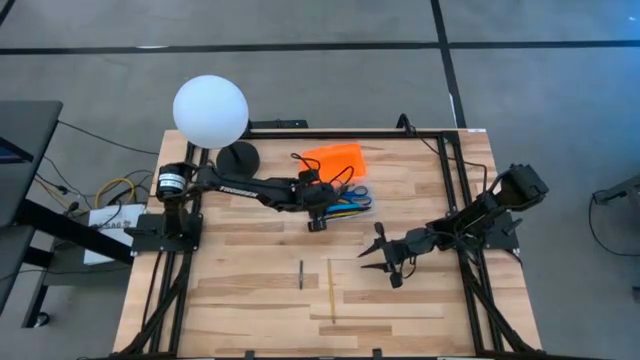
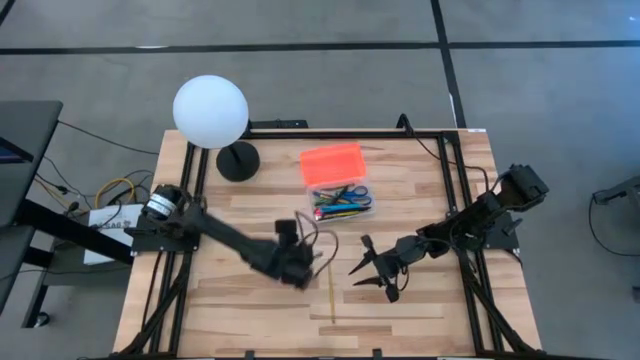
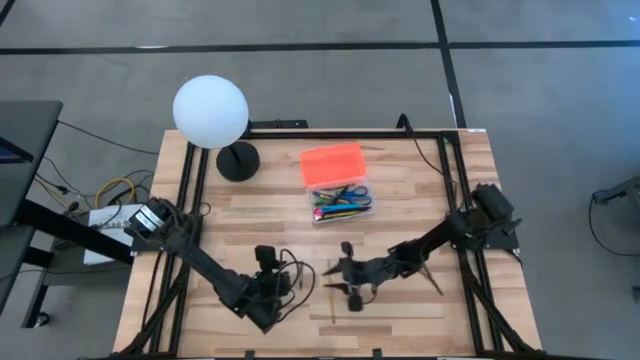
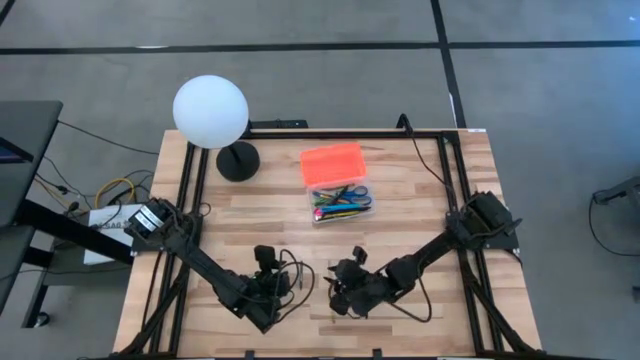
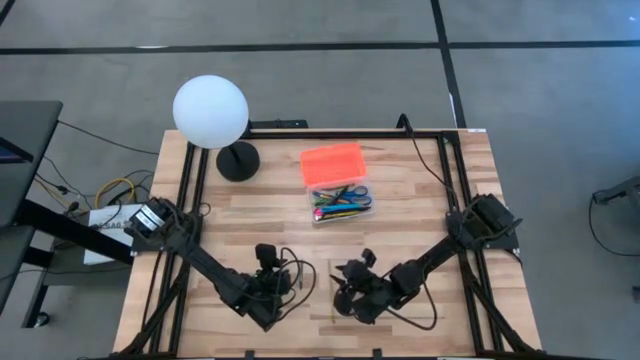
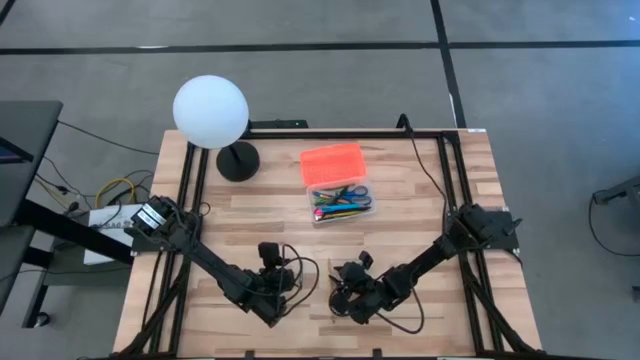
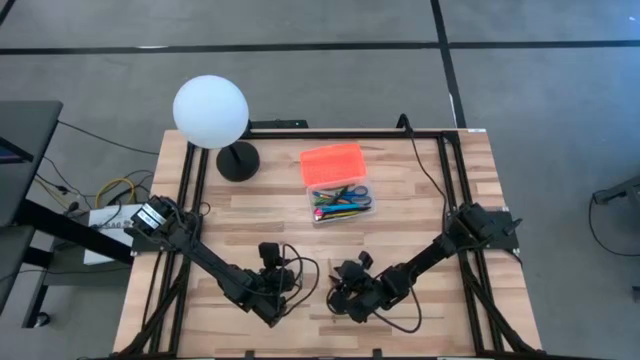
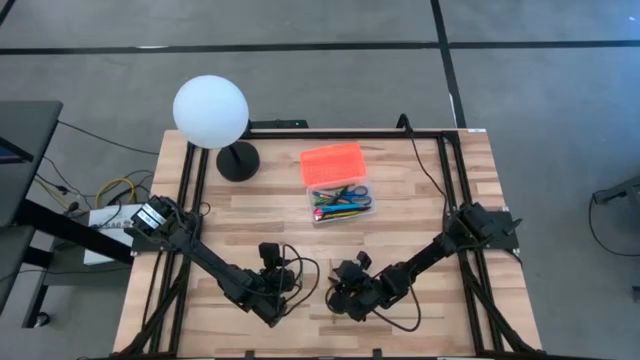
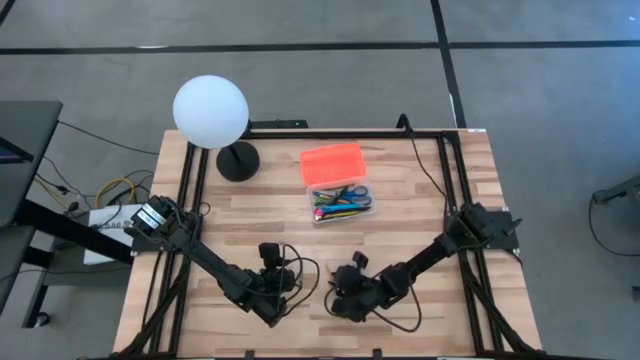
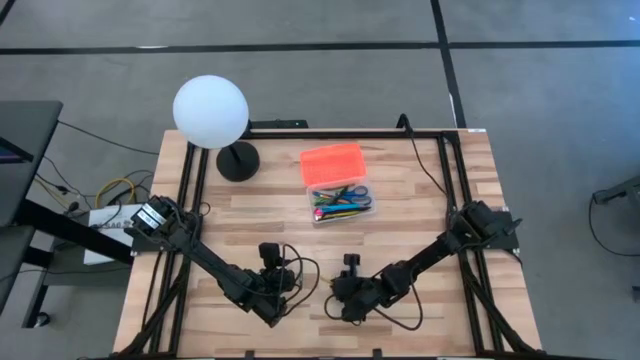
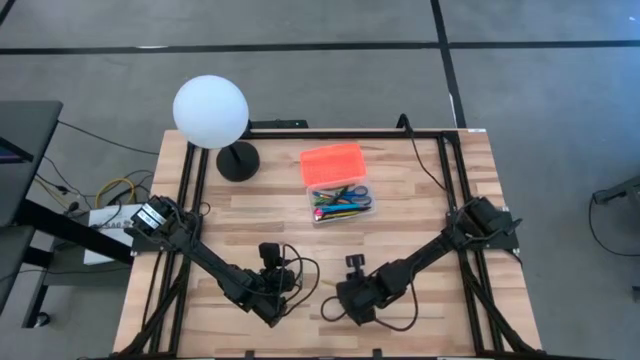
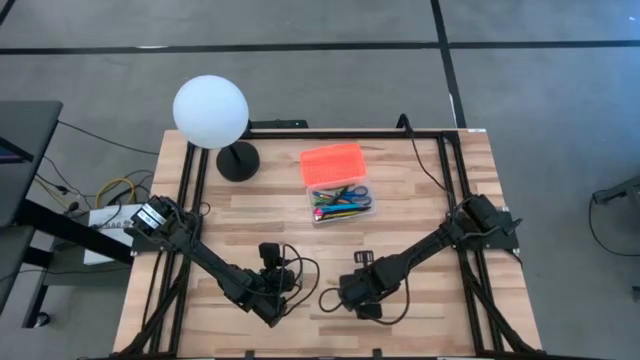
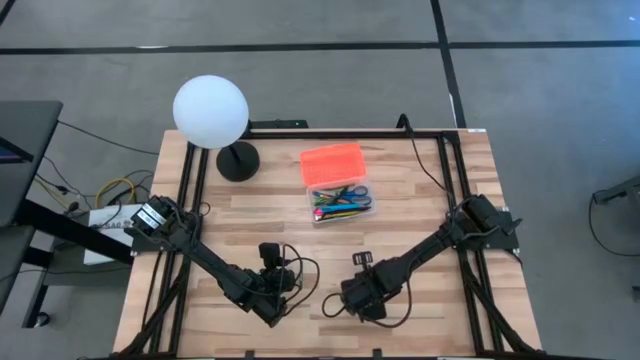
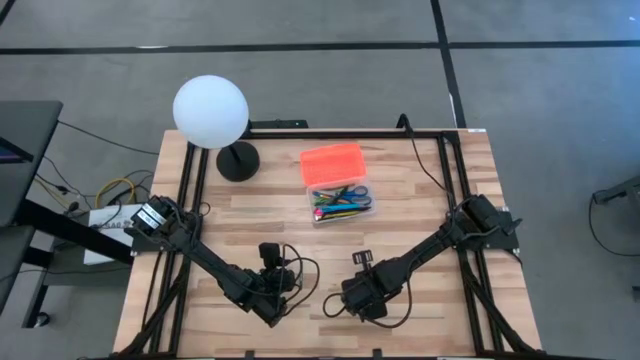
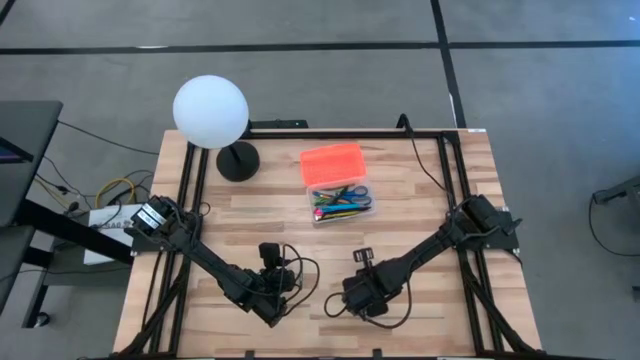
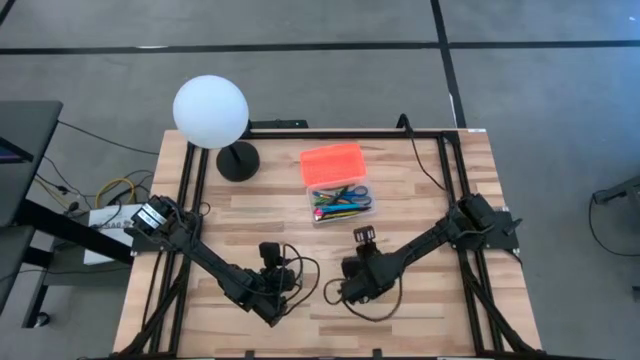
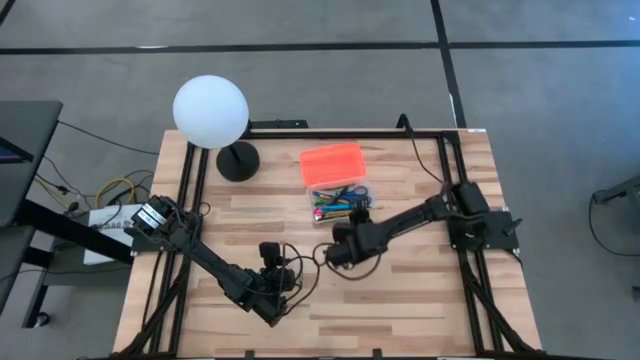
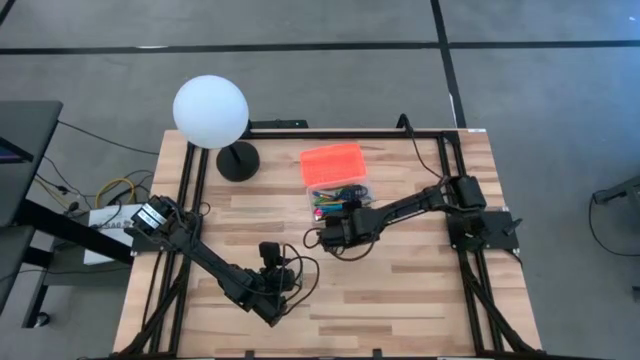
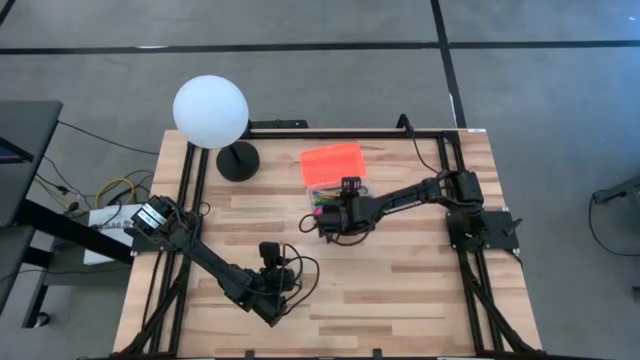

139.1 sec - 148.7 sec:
Task: Pick & place school supplies into a supply box
Put the yellow pencil into the orange supply box

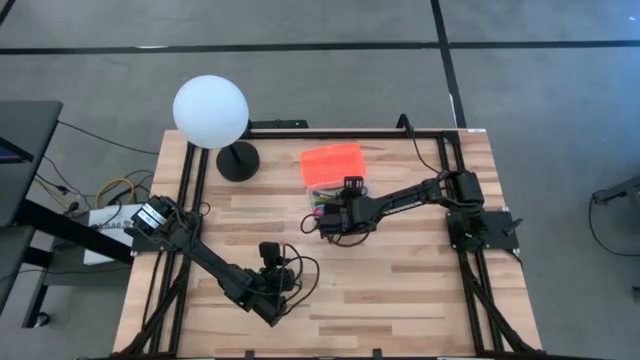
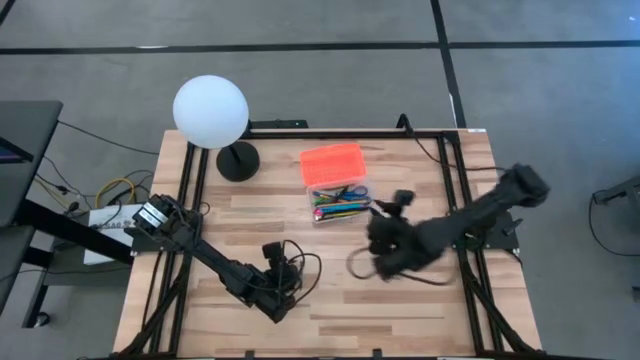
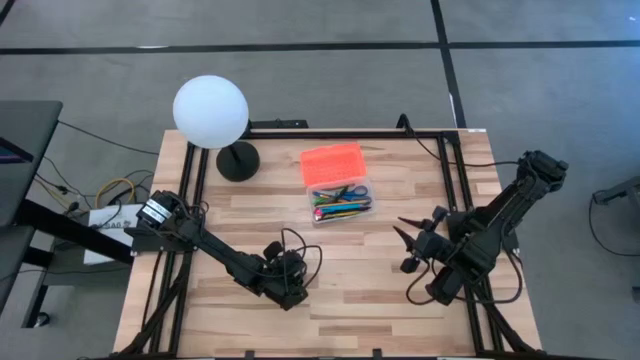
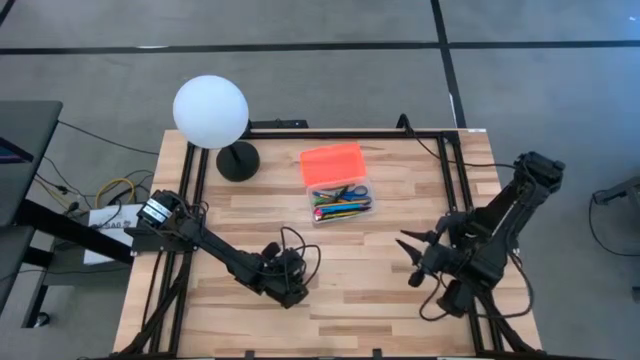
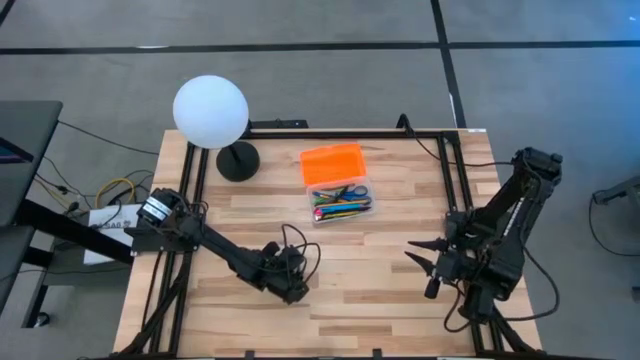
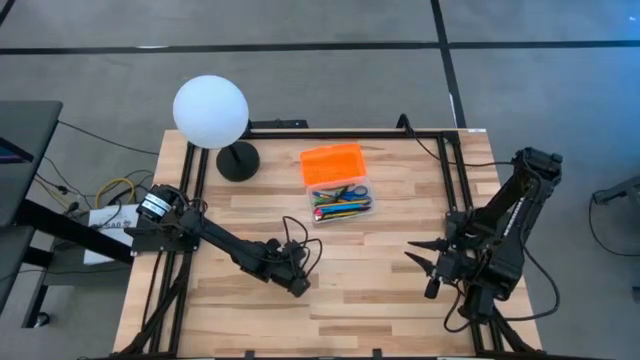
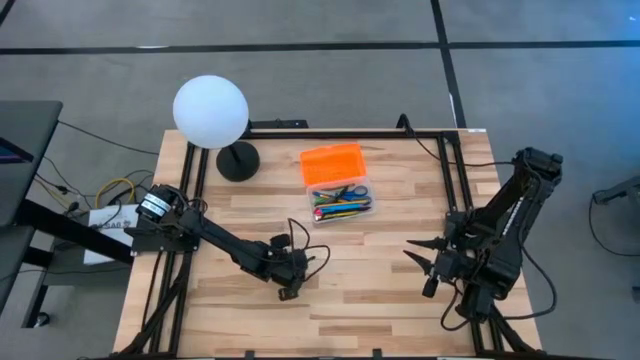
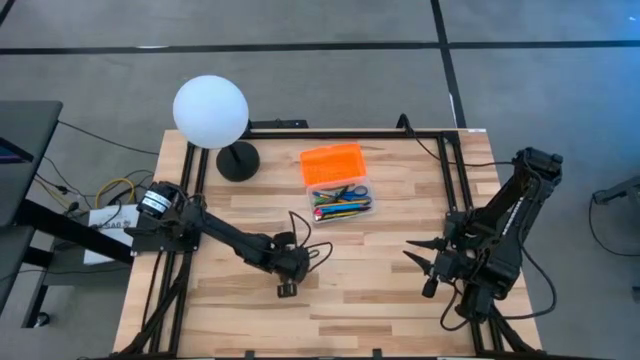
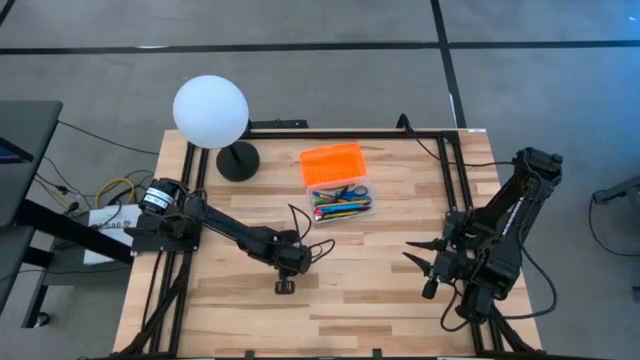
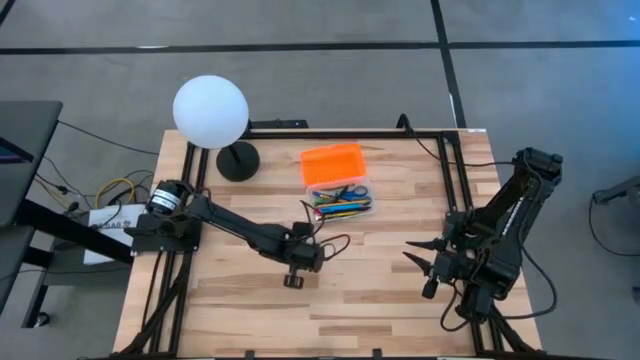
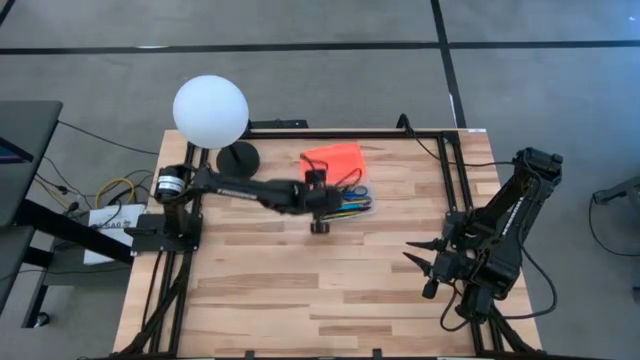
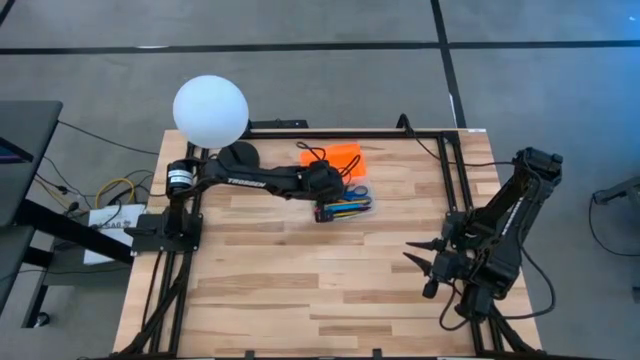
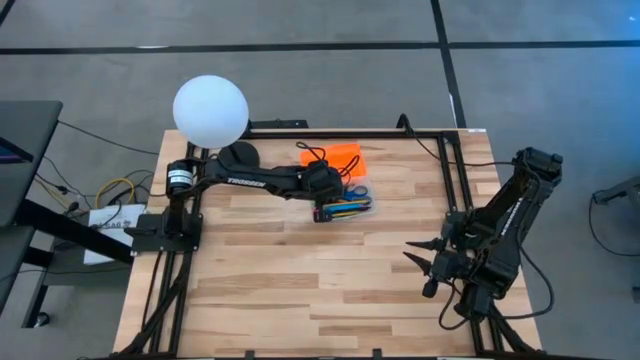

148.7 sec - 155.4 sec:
Put the green crayon into the orange supply box

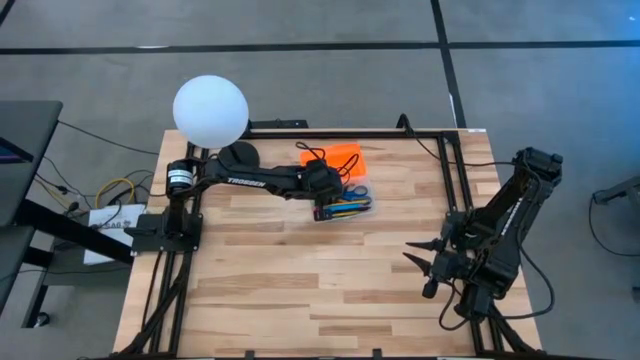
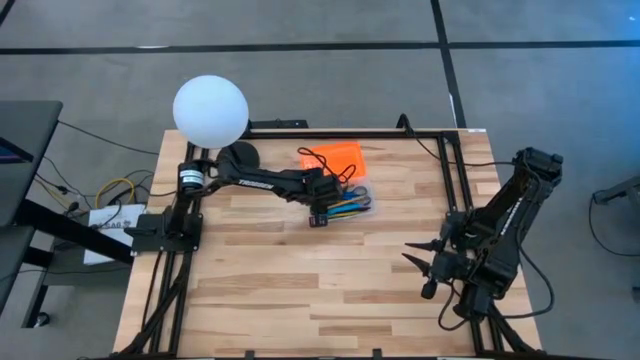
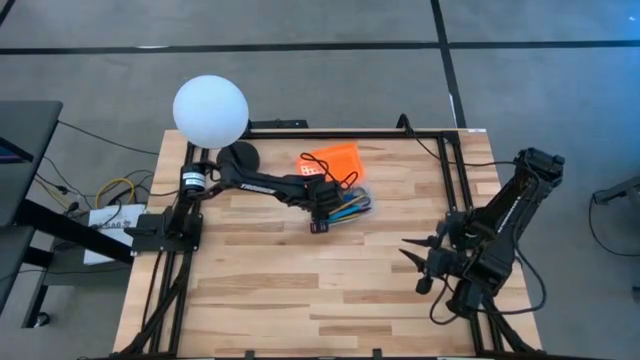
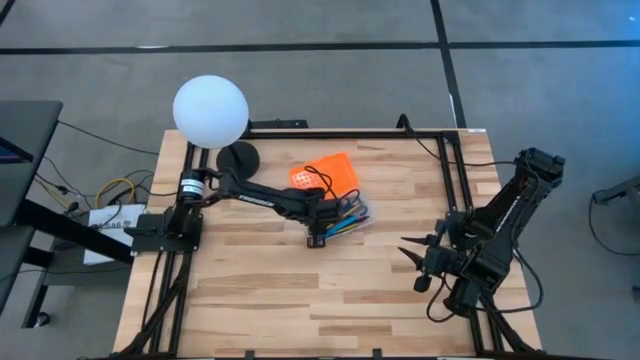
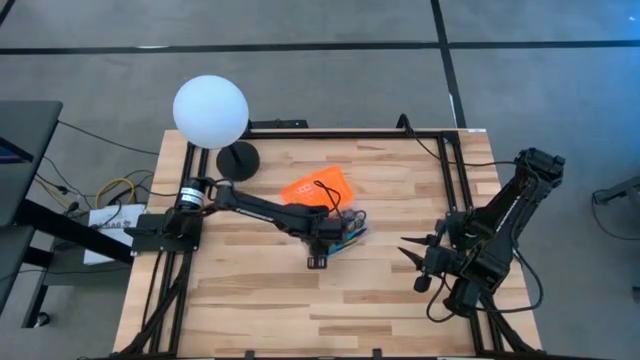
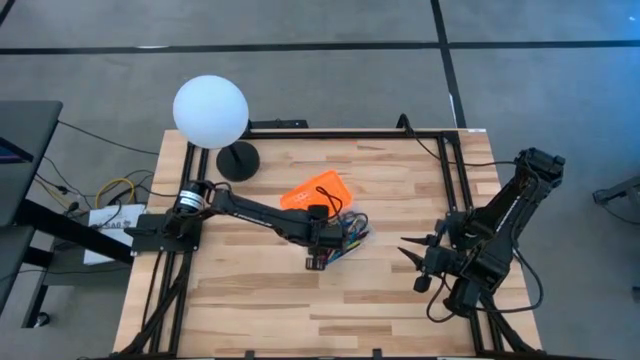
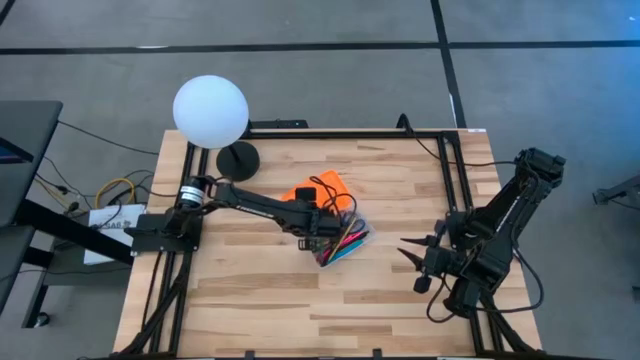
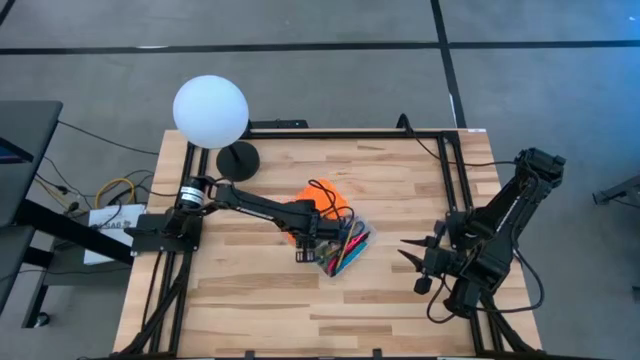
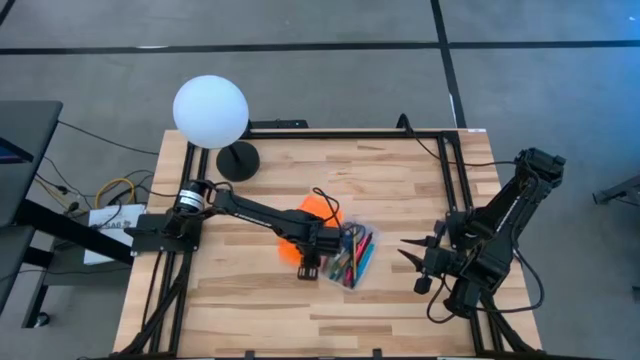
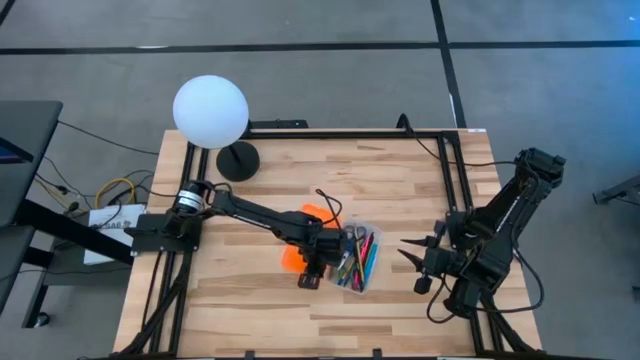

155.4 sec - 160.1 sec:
Move the orange supply box to the center of the table
